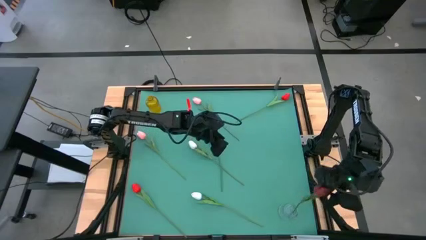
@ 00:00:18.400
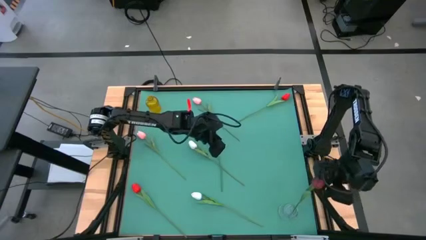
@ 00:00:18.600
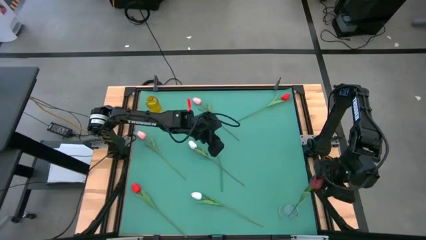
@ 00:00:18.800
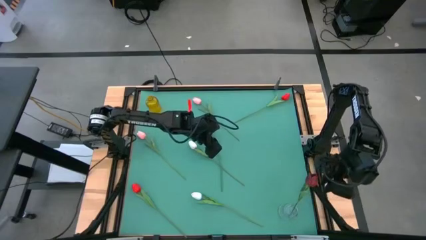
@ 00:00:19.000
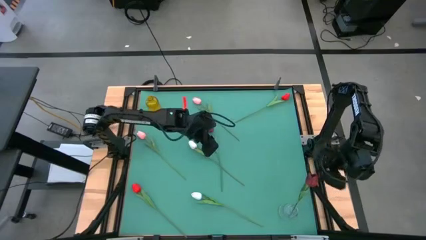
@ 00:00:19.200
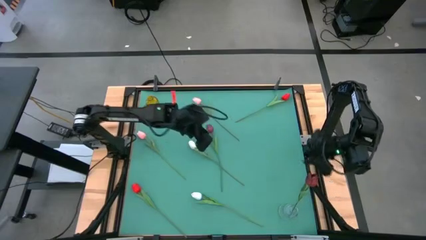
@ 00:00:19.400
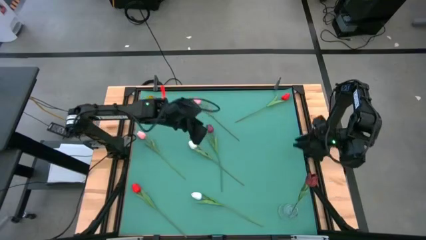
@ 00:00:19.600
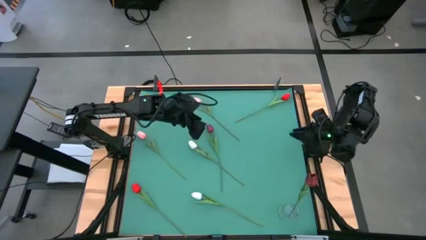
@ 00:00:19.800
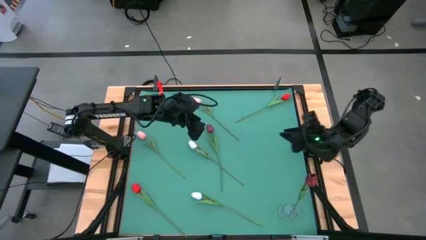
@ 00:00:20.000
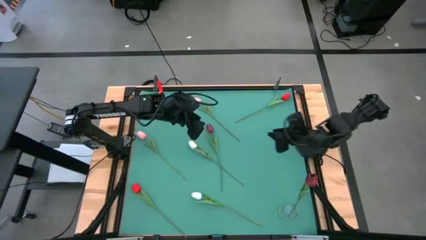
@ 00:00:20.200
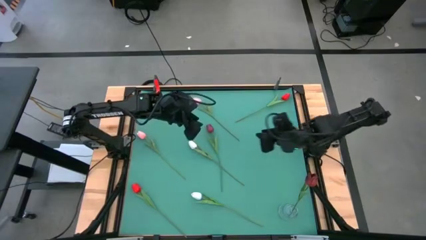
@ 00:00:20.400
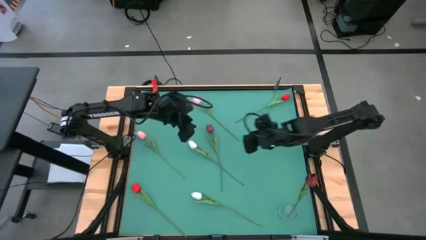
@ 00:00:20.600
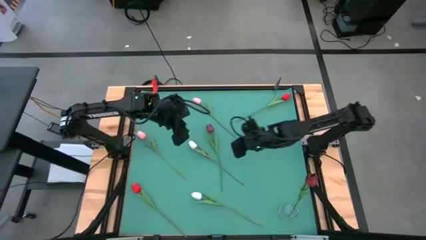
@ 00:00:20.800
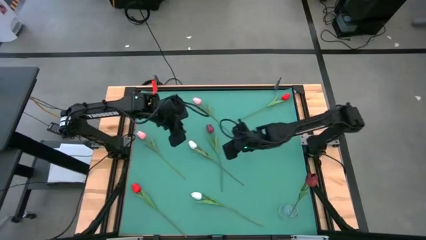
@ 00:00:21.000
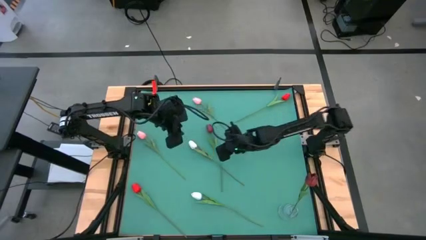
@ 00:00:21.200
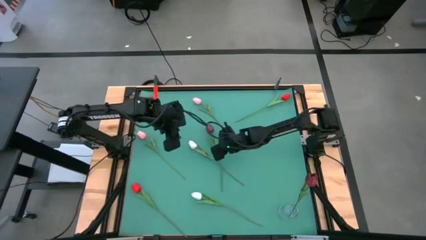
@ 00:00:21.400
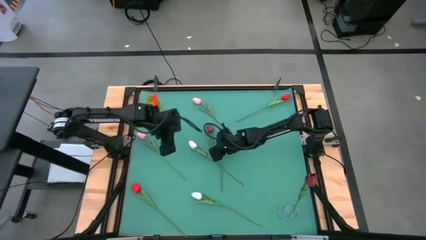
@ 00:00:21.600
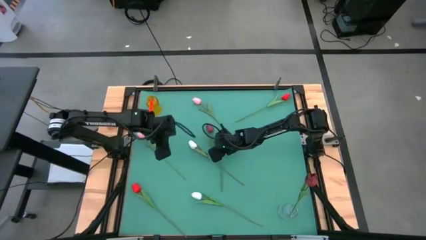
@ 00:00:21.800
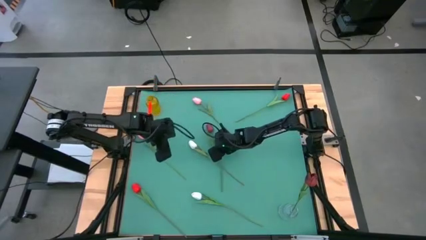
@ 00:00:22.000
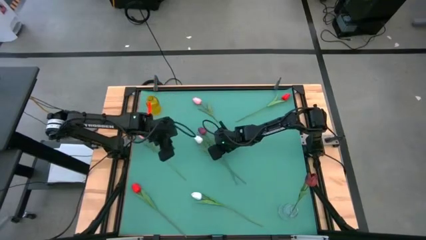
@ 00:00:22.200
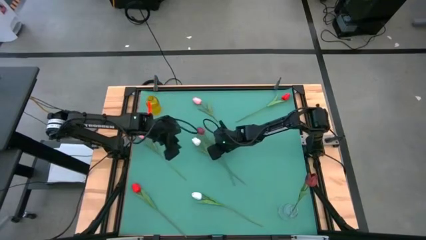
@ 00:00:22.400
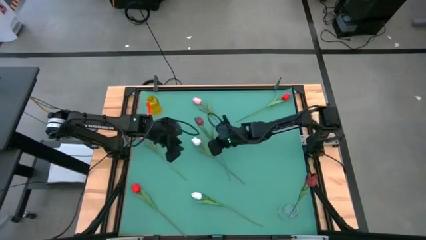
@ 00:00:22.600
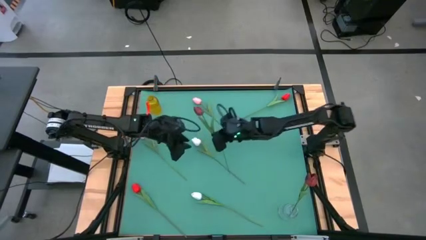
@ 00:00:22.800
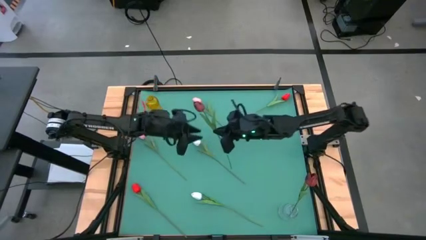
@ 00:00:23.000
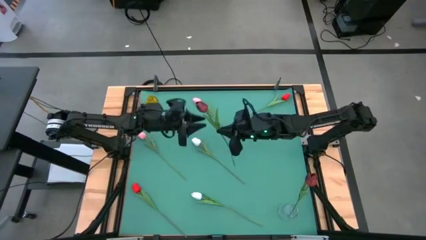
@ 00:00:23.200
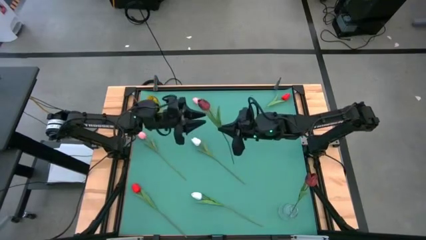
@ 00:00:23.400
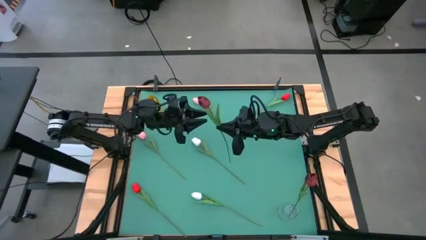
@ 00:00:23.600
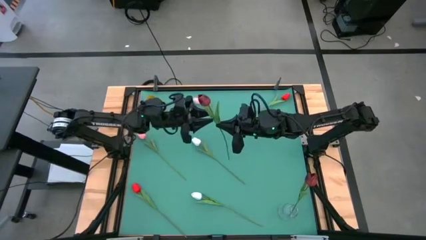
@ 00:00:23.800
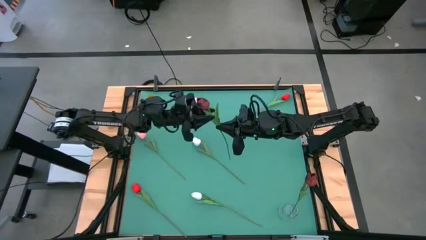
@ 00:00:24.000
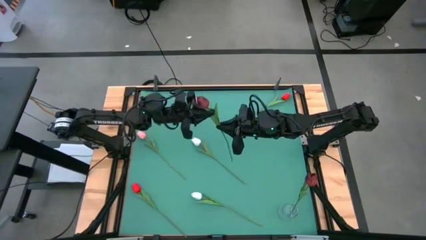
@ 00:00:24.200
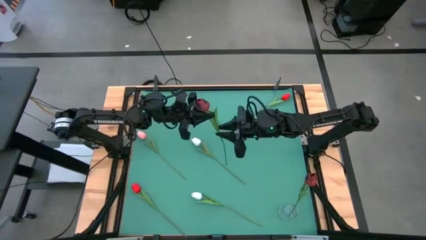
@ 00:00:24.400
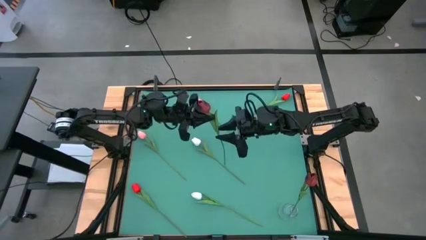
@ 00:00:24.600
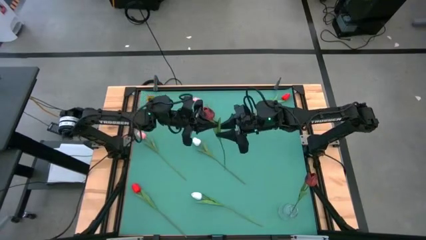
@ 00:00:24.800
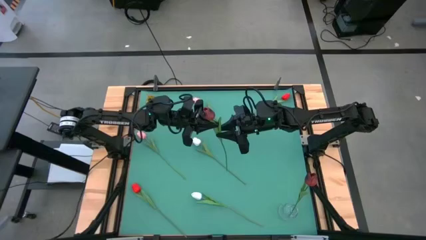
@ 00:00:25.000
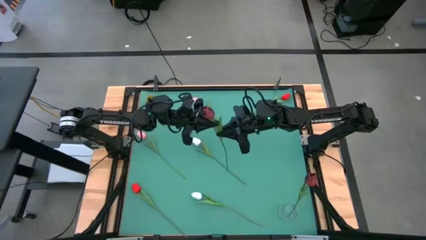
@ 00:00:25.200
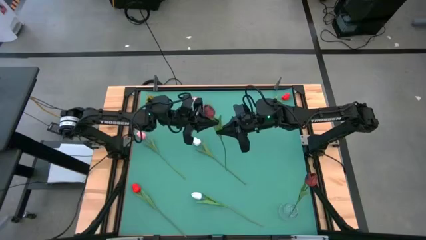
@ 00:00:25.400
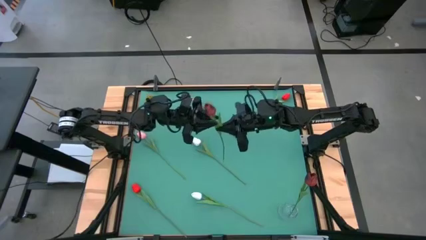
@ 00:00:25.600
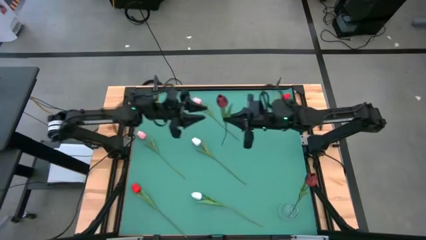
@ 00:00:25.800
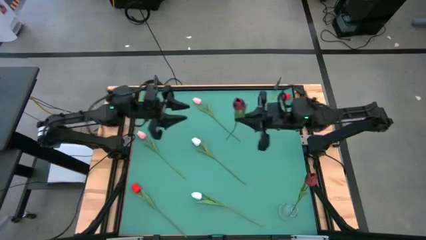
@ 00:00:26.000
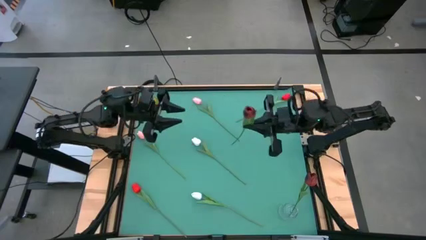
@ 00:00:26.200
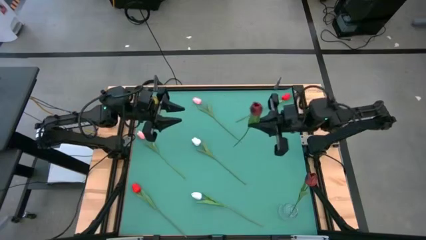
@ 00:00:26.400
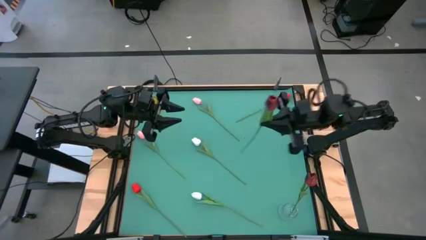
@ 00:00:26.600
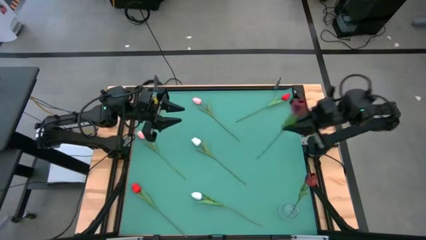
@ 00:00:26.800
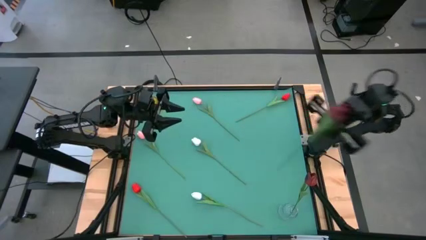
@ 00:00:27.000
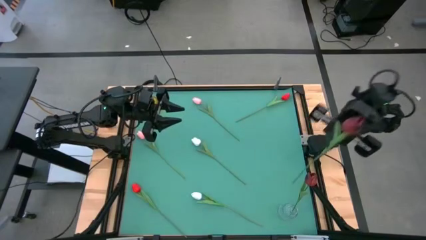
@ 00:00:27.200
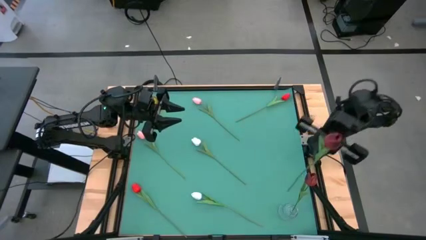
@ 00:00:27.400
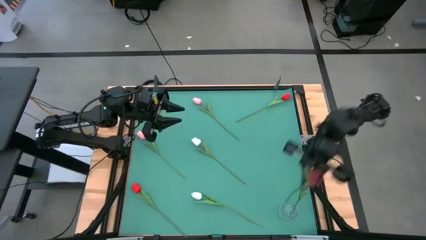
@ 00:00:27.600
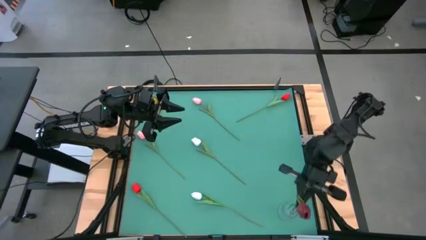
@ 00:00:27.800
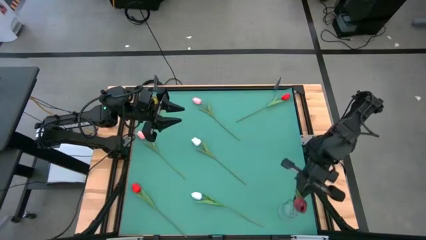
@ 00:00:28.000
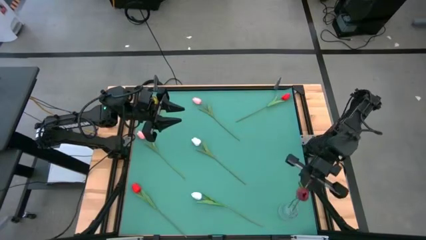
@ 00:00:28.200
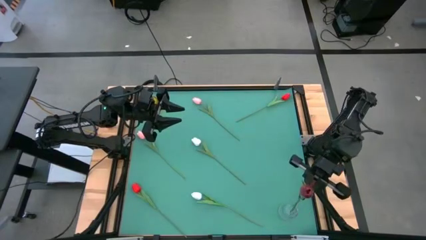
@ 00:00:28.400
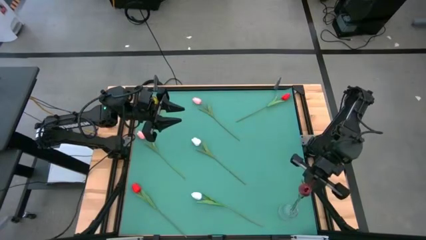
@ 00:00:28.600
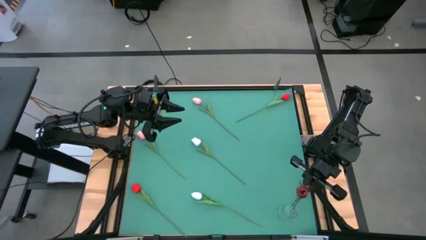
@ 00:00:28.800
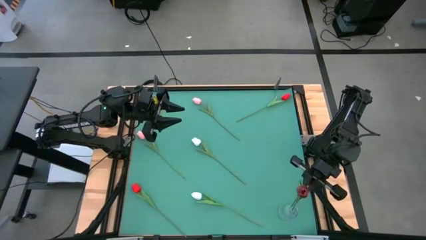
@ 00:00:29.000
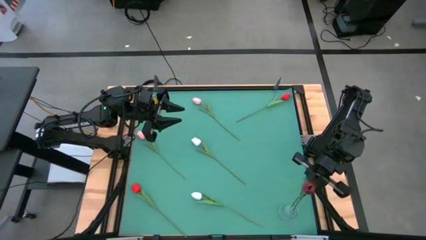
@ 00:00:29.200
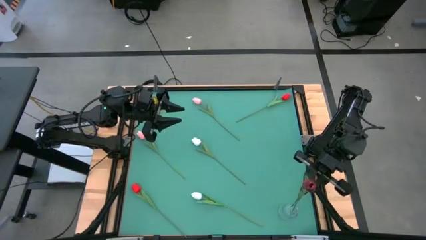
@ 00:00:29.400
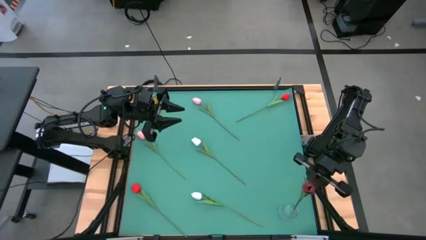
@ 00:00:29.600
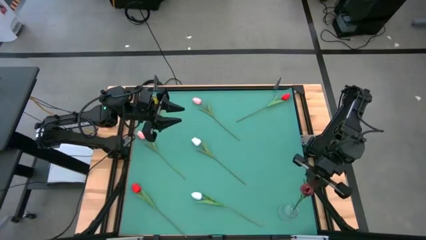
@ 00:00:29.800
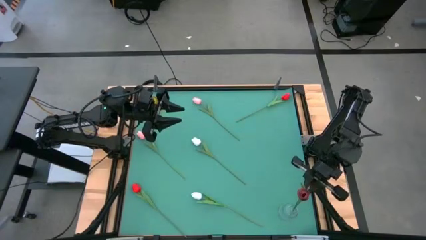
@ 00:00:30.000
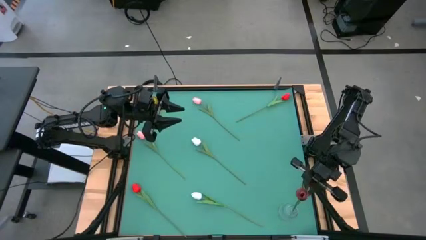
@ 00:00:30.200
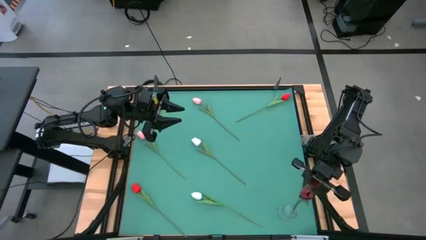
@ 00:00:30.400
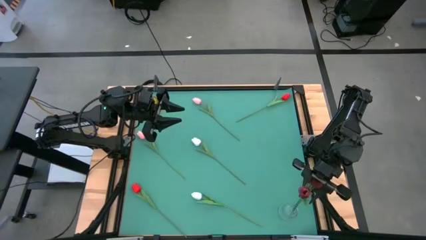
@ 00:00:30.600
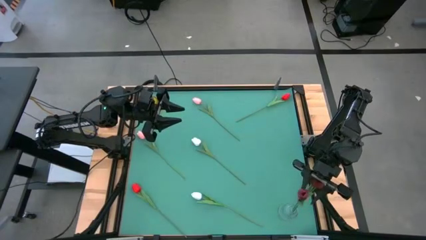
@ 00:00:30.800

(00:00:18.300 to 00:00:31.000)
Task: Sort flowers into vase by color
Put the dark red tulip into the transparent vase
